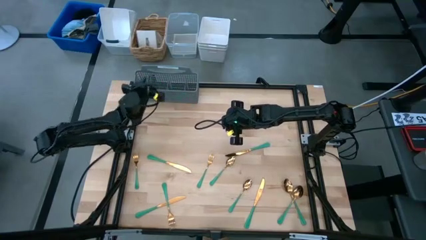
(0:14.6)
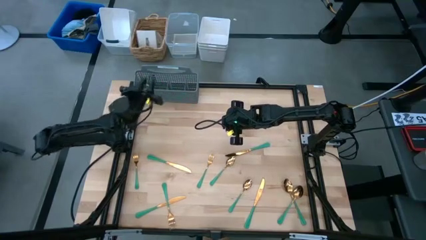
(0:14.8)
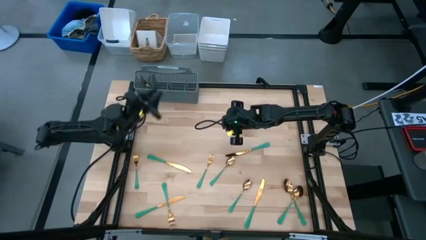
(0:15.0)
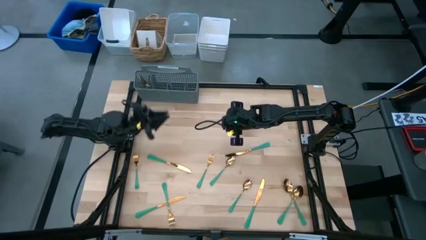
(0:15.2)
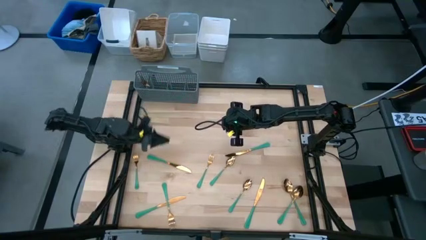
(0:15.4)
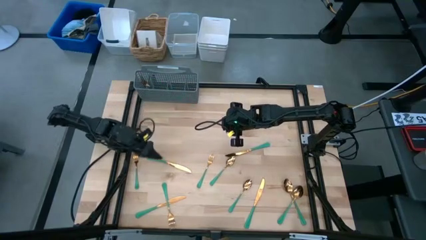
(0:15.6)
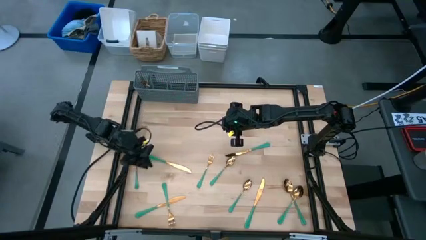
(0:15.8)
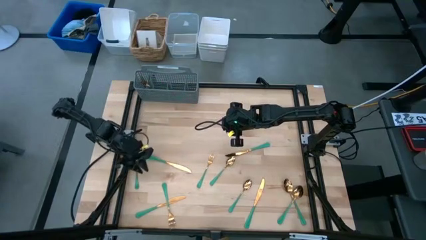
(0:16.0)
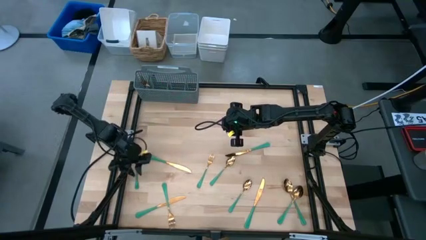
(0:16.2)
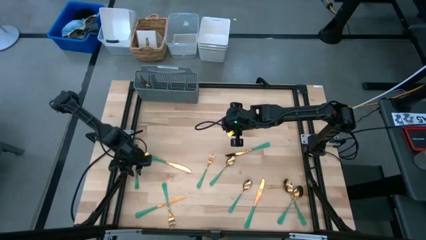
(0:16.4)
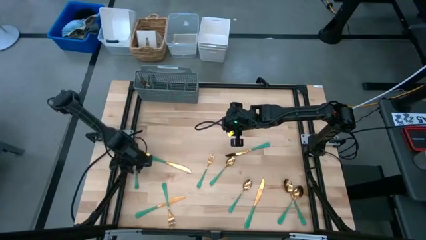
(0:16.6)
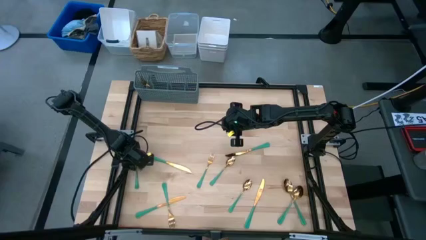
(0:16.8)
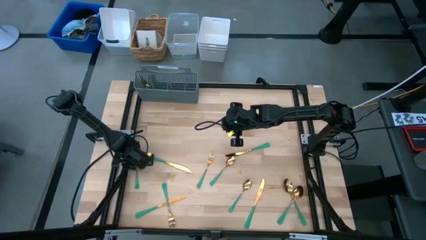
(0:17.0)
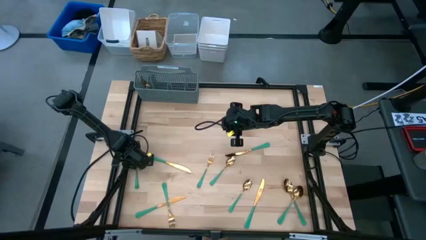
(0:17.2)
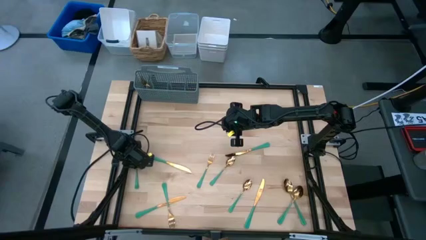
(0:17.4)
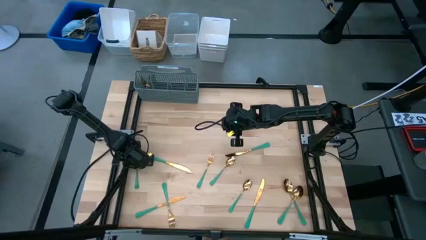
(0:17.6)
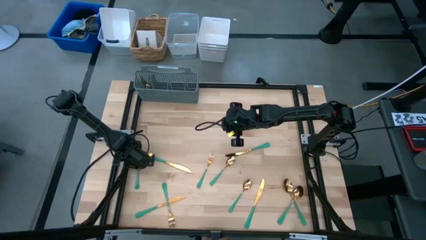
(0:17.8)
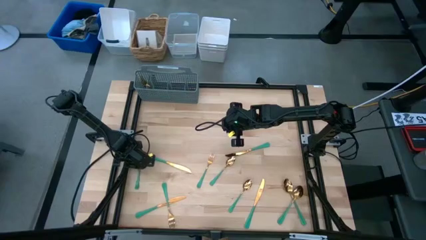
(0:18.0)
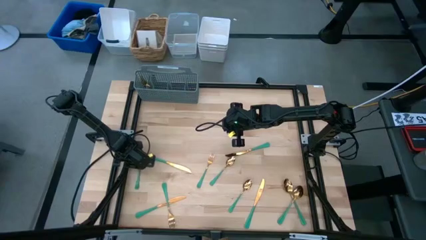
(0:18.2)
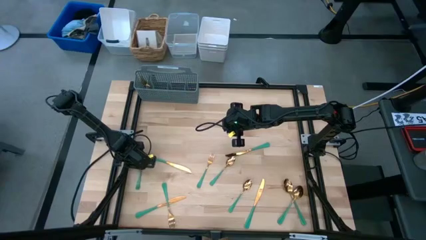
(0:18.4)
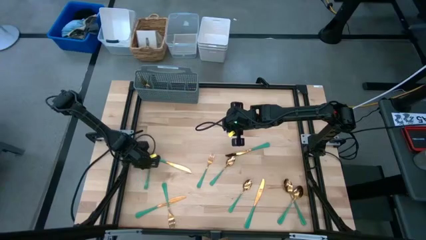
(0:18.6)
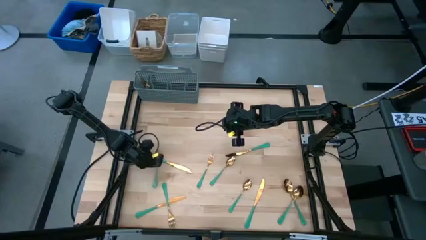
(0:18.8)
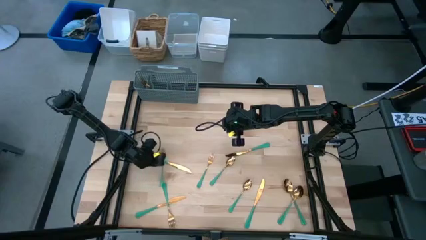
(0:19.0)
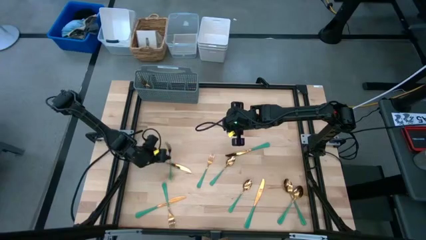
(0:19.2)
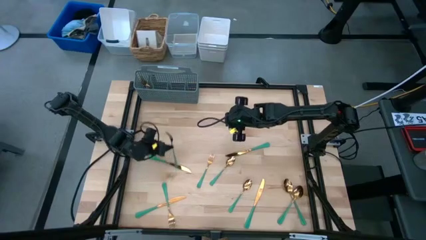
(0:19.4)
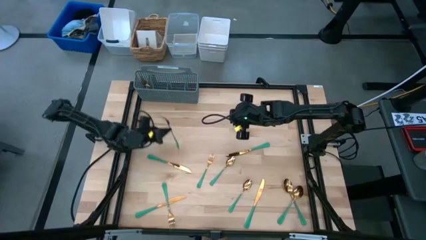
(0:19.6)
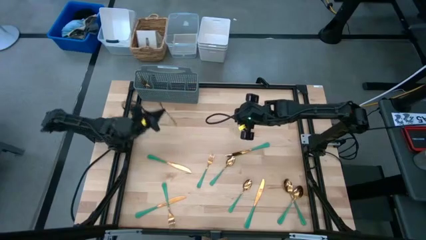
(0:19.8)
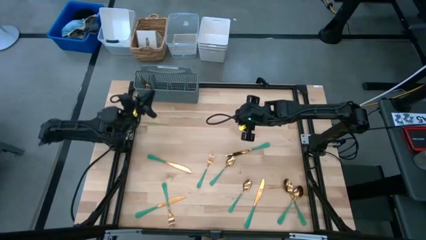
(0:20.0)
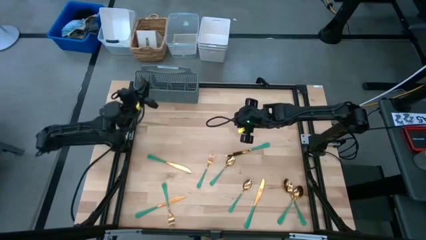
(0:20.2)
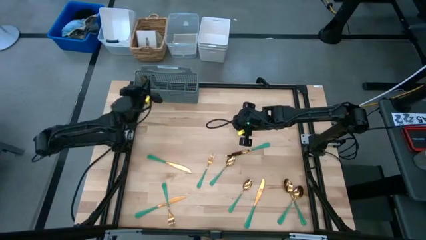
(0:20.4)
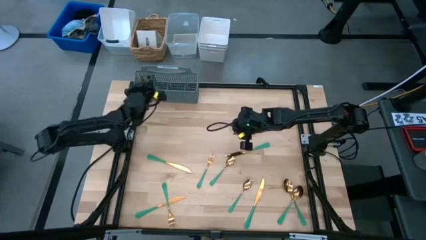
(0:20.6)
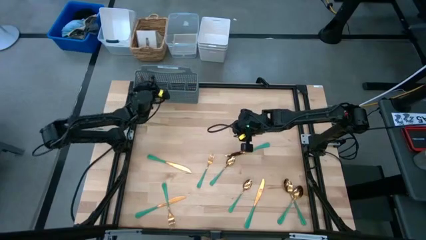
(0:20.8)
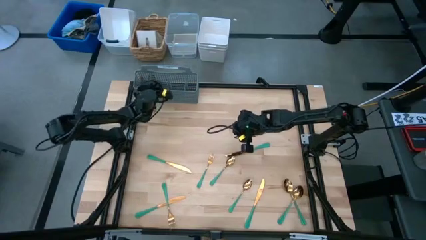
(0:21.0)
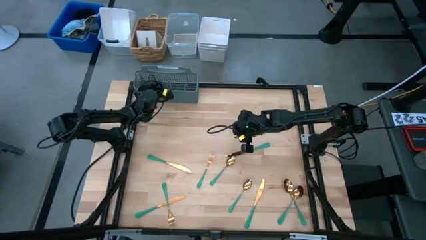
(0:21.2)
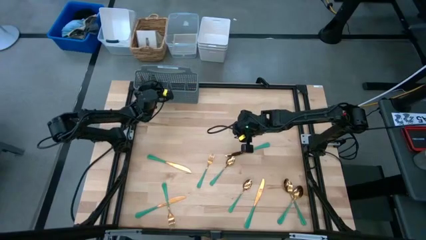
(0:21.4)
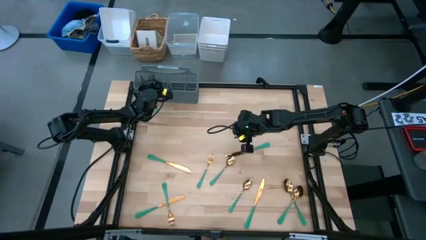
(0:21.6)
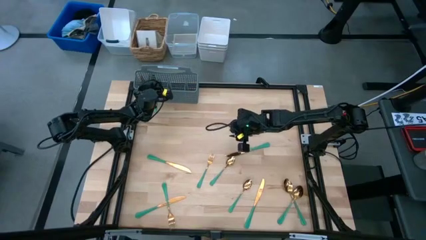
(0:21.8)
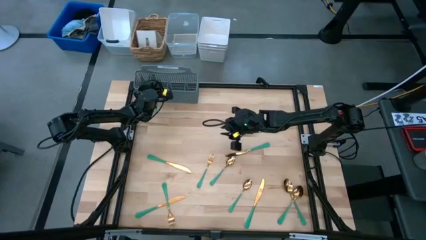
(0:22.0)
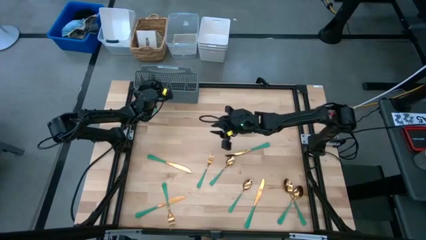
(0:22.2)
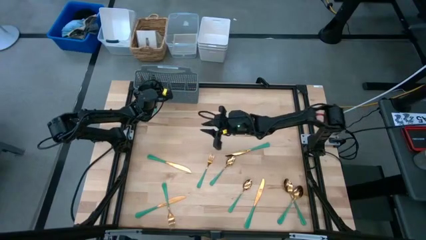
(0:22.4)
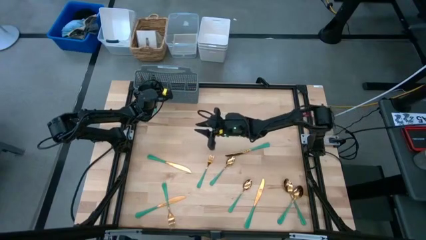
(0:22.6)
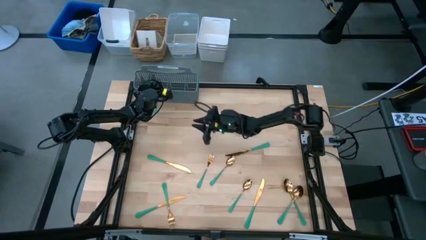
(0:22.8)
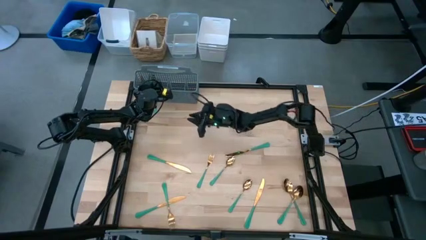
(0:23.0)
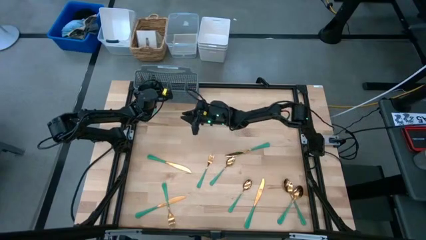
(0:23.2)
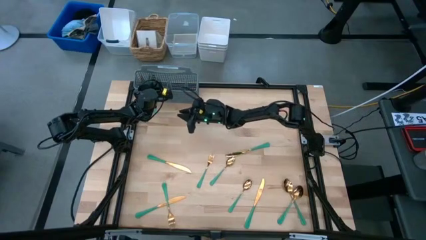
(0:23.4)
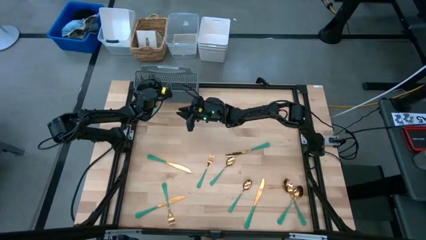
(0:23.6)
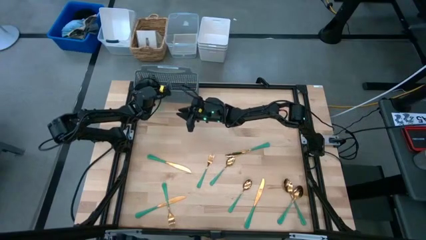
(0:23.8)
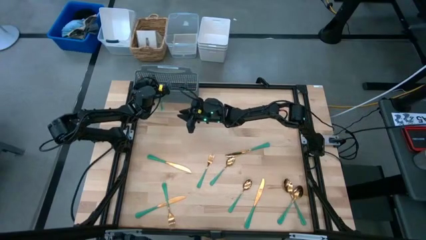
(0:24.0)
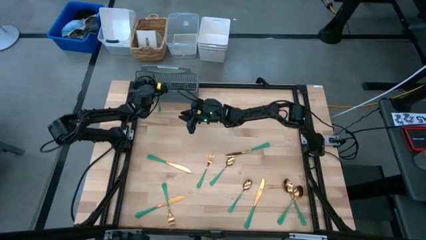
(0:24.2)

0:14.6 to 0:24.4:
Task: Sort silverware
Put the green fork into the gray silverware basket

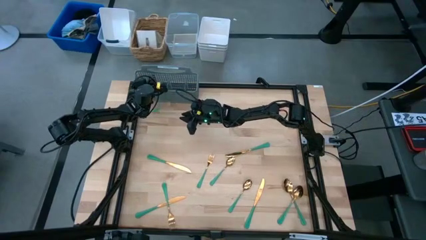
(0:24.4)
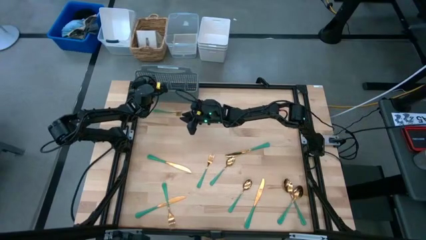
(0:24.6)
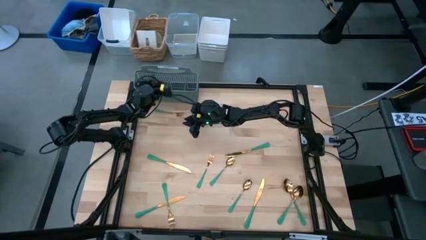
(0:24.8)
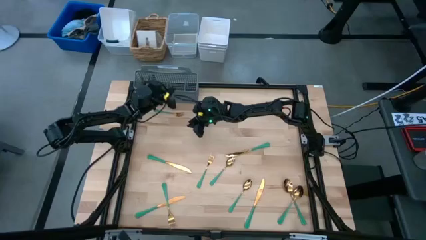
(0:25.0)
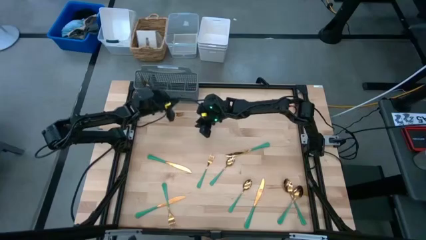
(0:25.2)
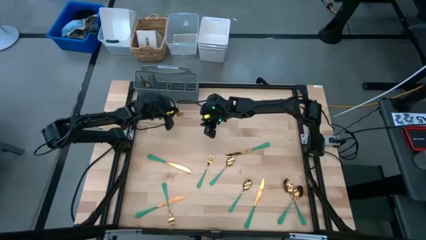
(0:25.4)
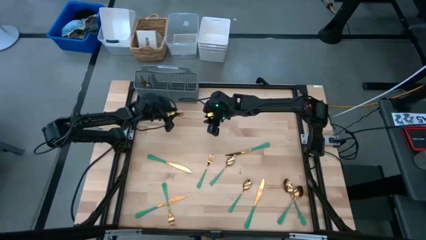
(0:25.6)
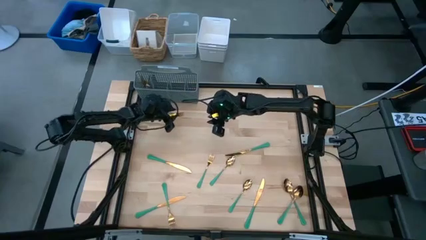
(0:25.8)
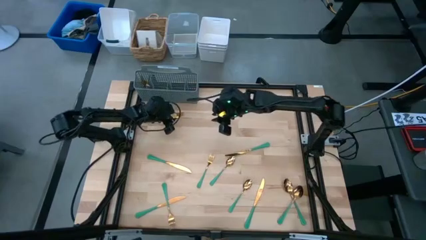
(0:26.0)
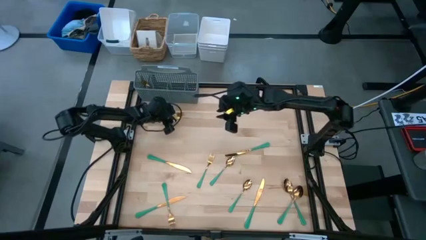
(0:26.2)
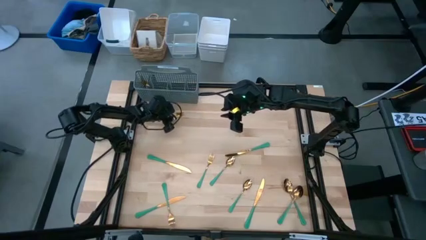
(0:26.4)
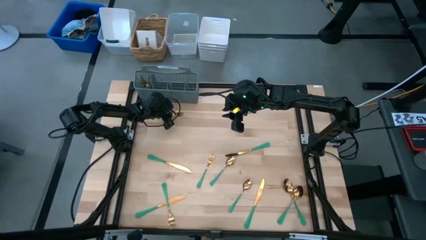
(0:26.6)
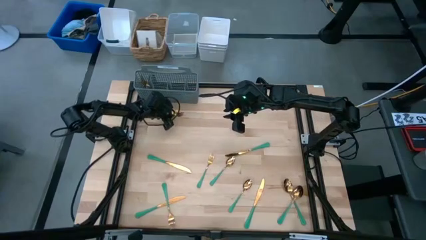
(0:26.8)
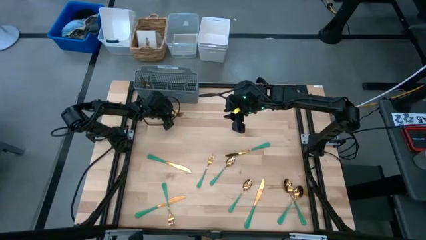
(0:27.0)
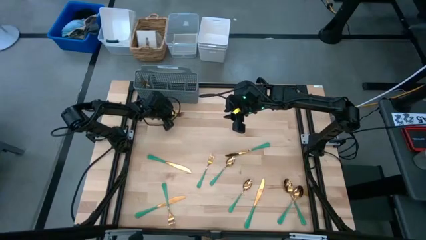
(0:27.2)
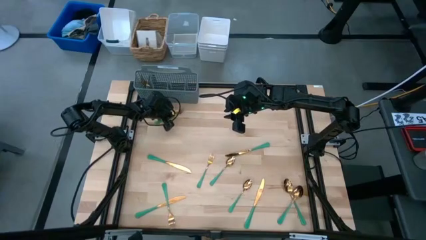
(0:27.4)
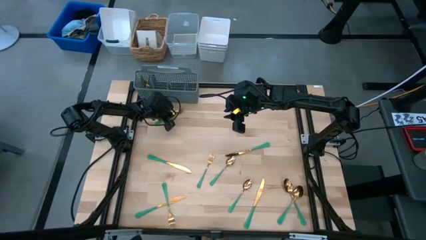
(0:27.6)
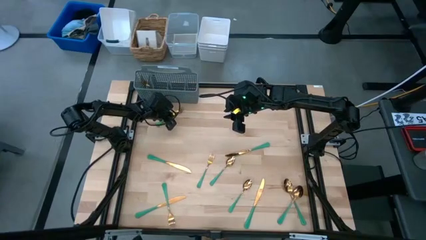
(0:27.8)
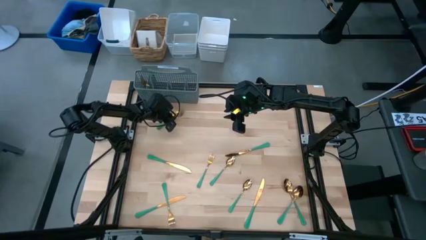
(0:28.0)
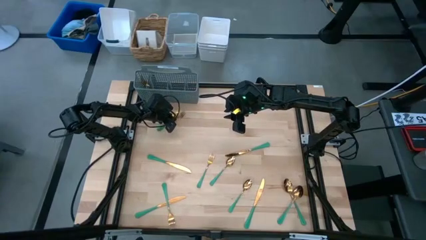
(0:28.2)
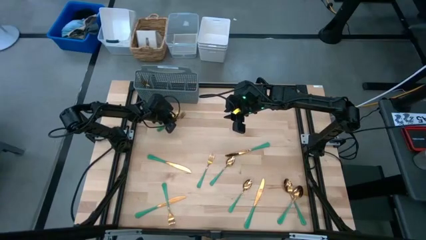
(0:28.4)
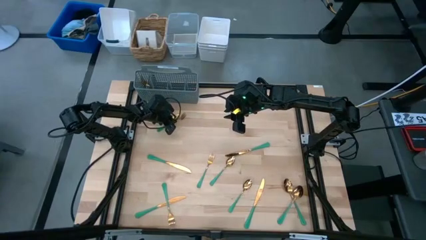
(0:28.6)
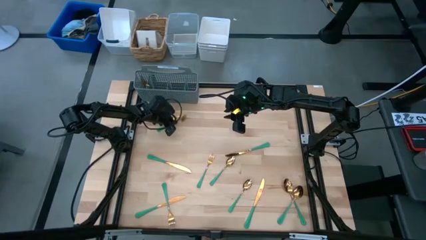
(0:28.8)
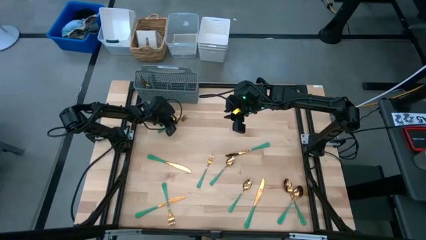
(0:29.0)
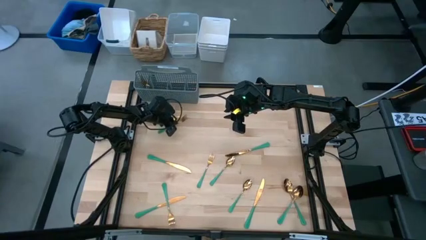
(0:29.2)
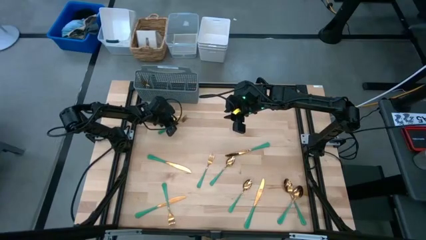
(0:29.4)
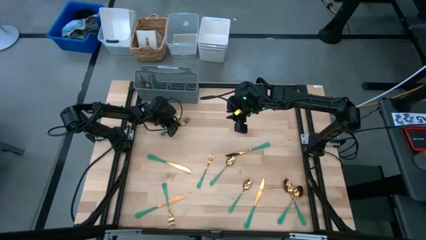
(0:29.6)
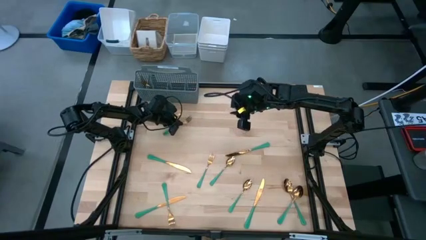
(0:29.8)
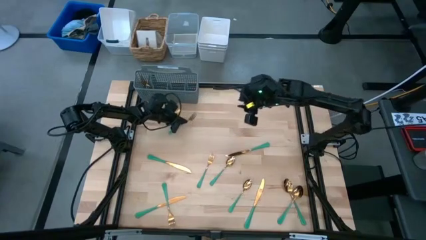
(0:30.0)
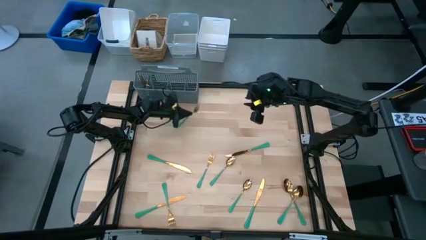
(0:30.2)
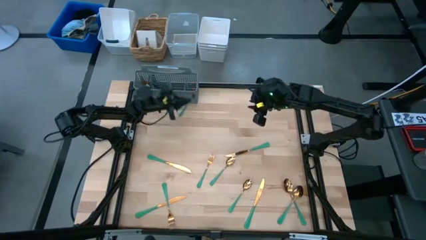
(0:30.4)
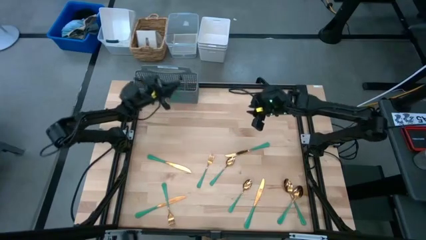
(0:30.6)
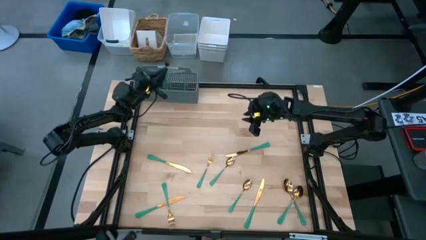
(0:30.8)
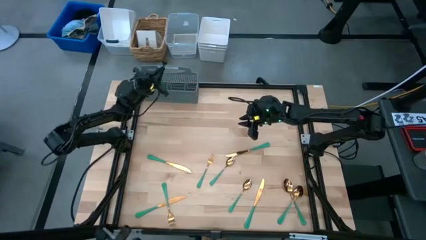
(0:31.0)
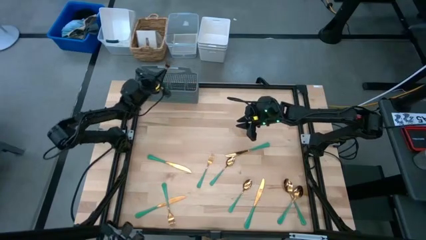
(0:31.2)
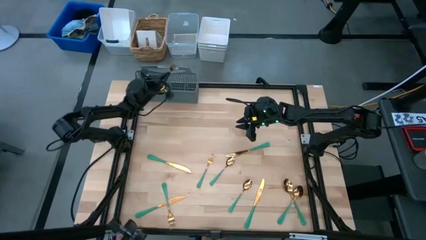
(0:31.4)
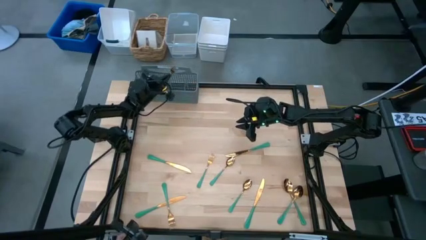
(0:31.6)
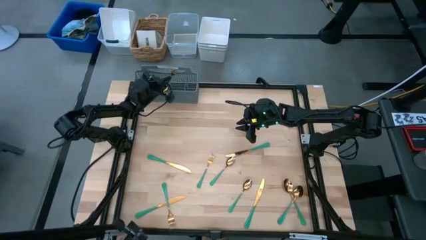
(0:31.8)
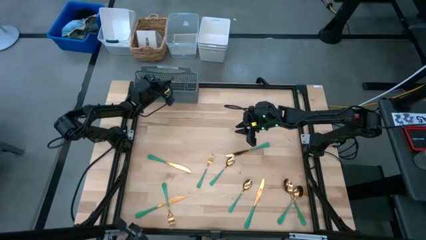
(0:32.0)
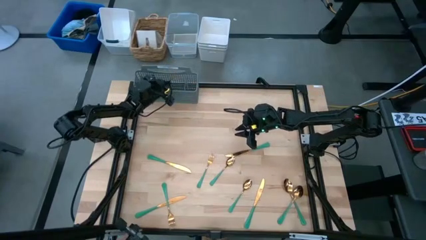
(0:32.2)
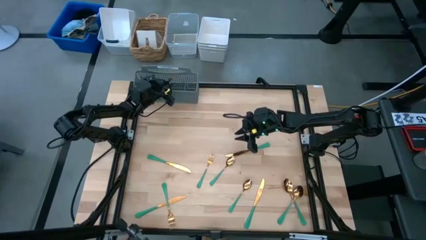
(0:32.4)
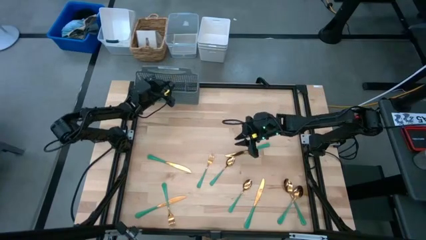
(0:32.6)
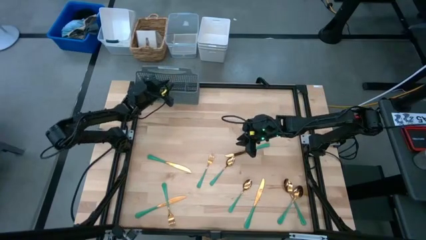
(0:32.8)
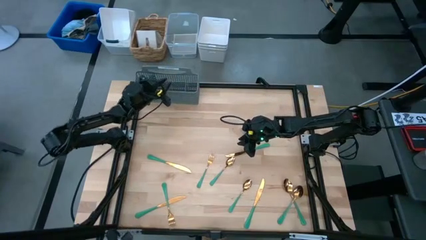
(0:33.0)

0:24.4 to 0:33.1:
Put the green fork into the gray silverware basket
